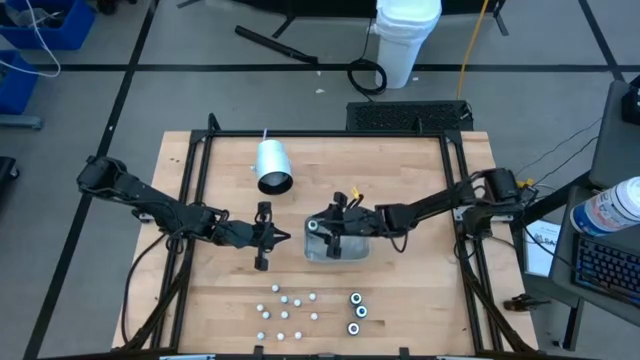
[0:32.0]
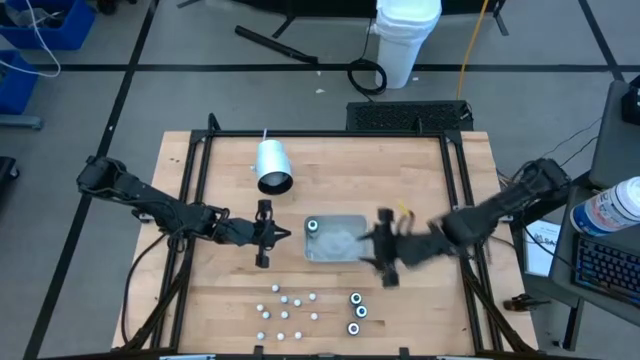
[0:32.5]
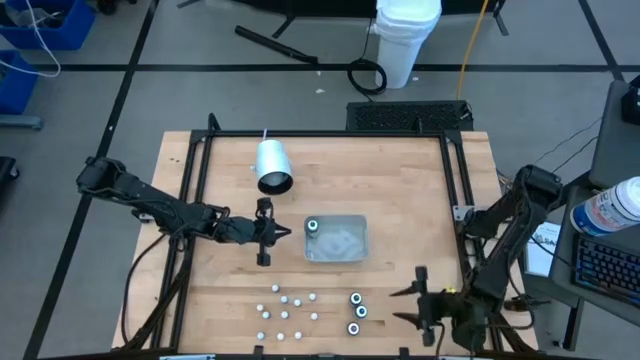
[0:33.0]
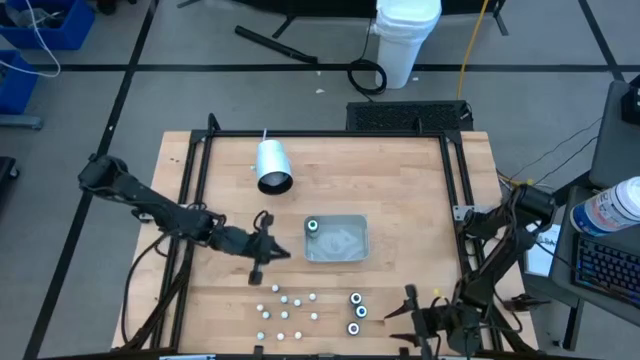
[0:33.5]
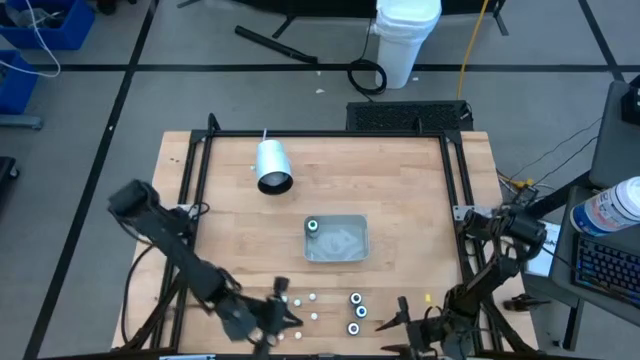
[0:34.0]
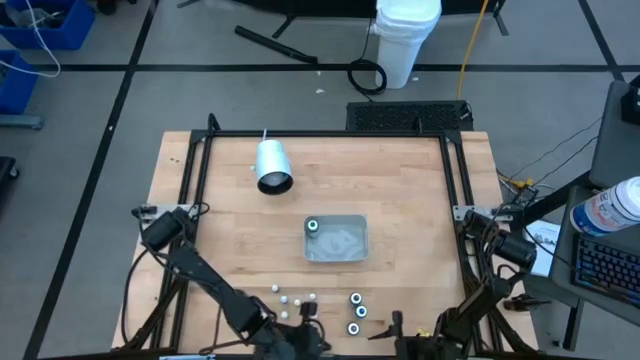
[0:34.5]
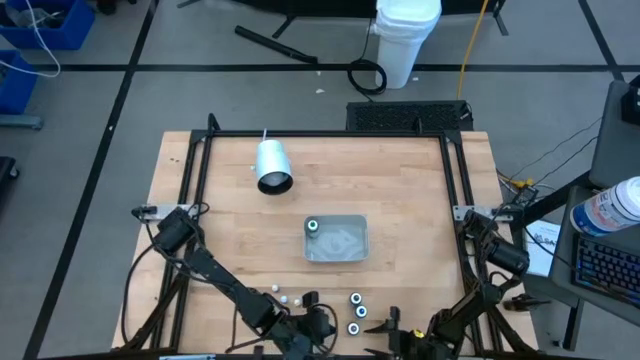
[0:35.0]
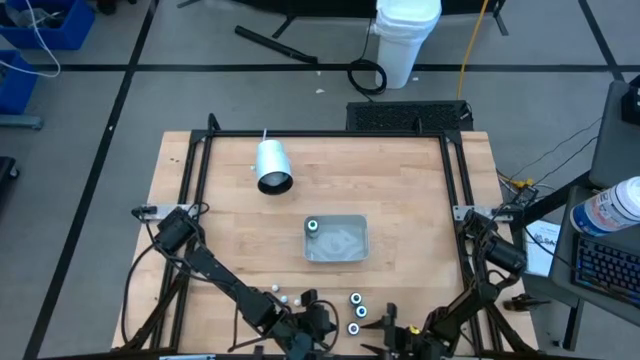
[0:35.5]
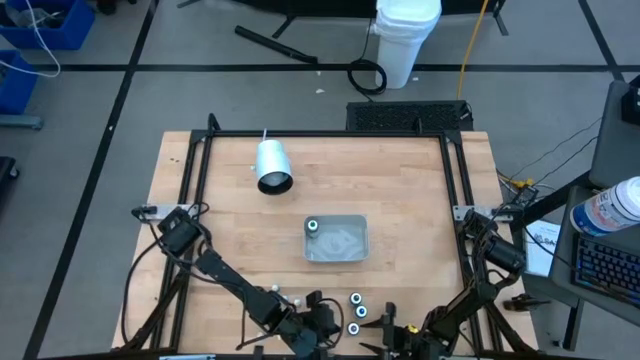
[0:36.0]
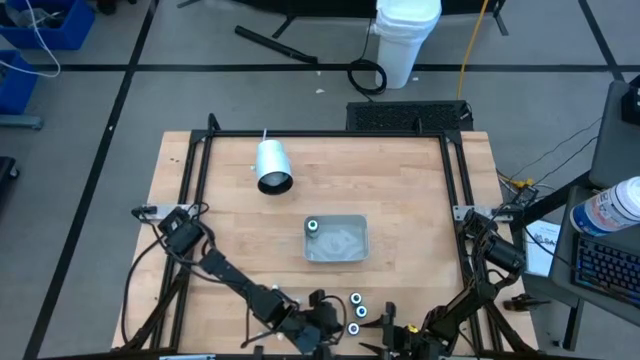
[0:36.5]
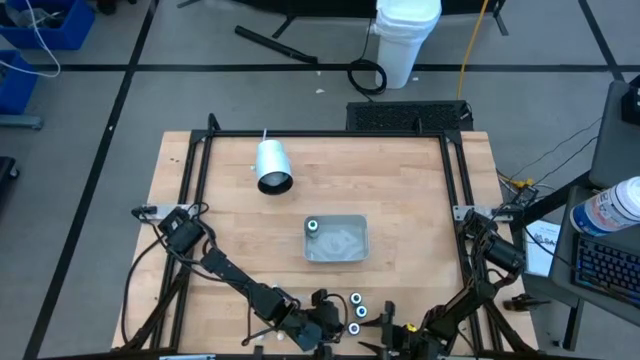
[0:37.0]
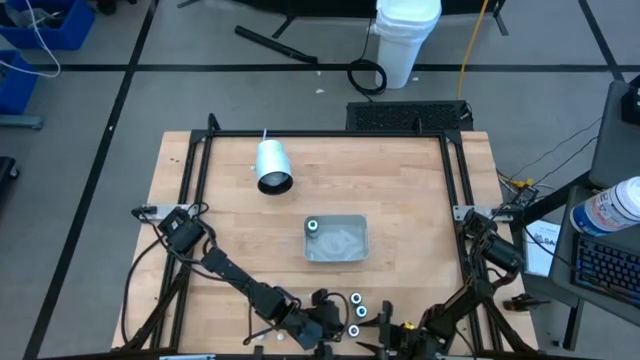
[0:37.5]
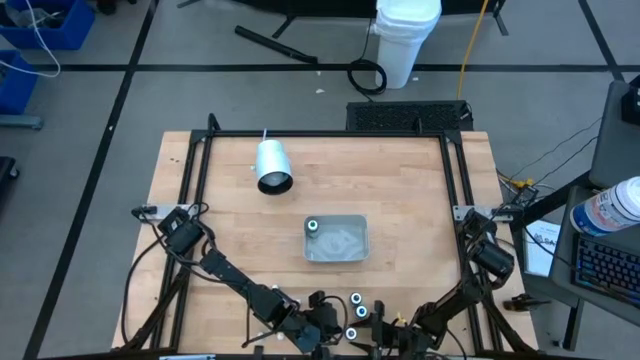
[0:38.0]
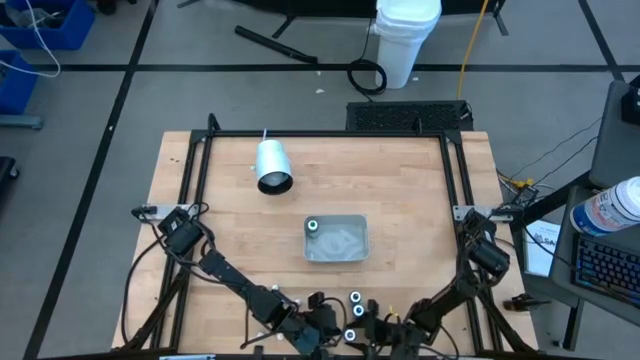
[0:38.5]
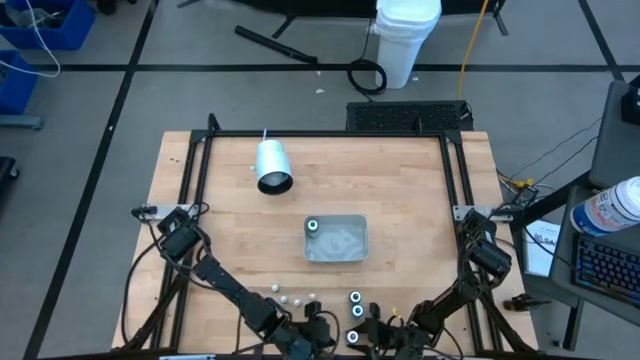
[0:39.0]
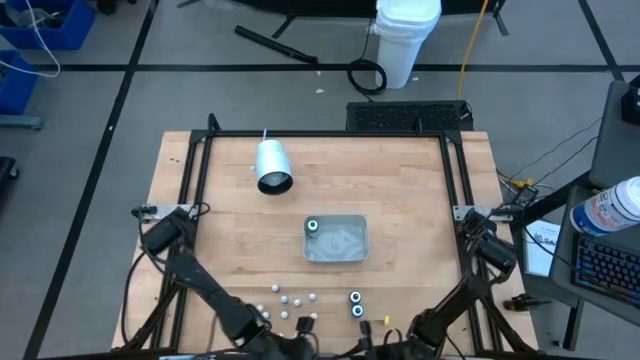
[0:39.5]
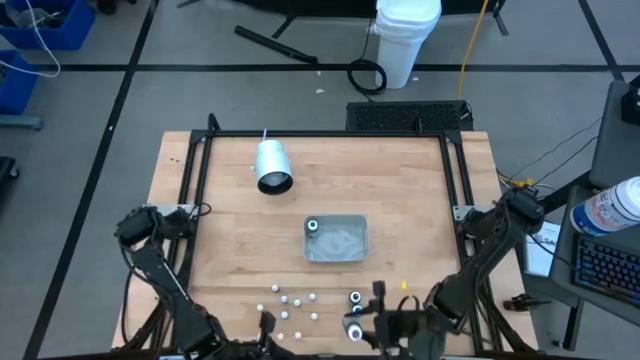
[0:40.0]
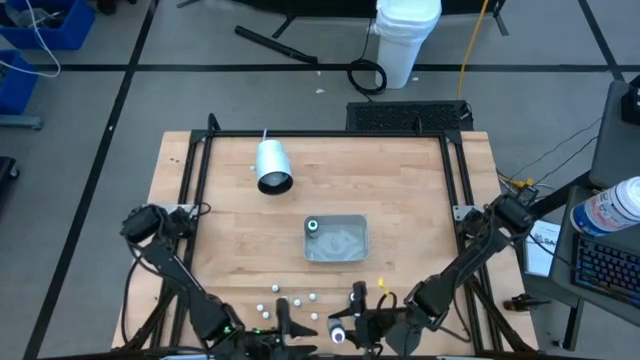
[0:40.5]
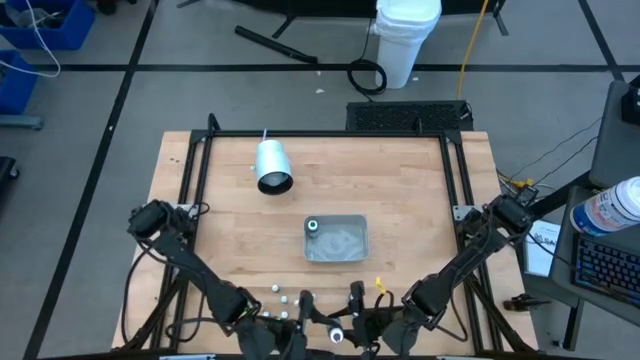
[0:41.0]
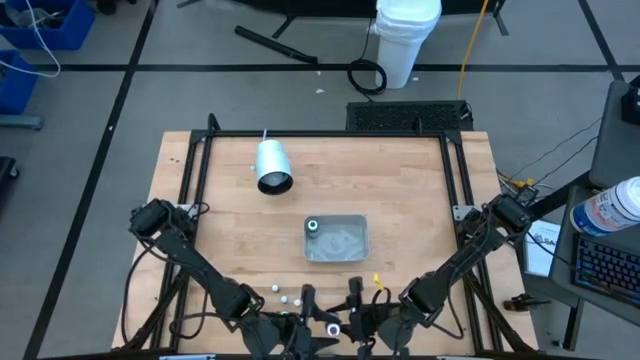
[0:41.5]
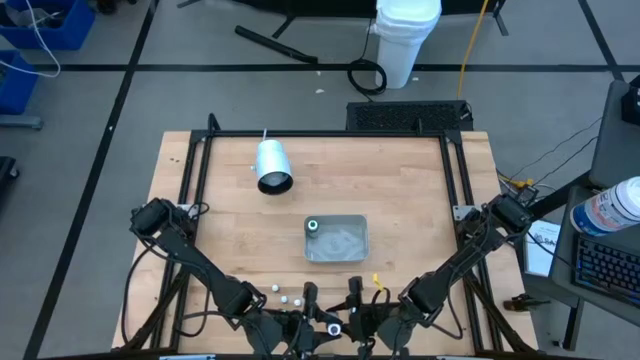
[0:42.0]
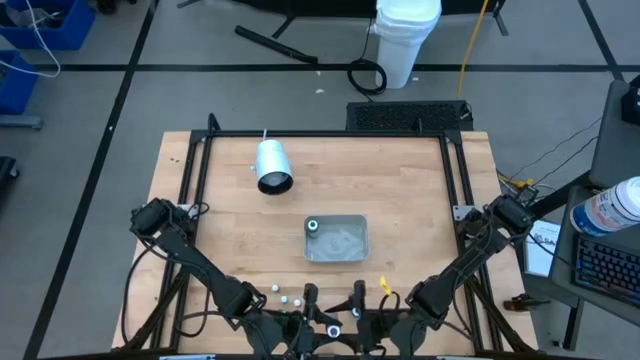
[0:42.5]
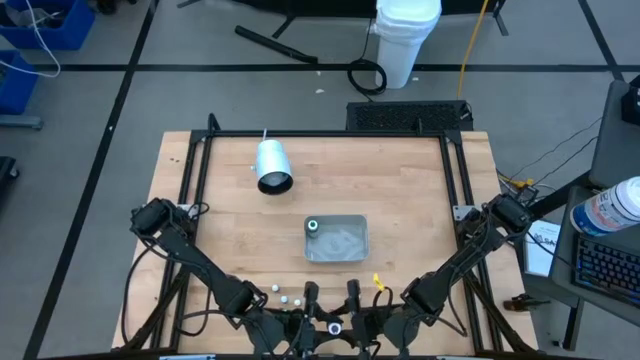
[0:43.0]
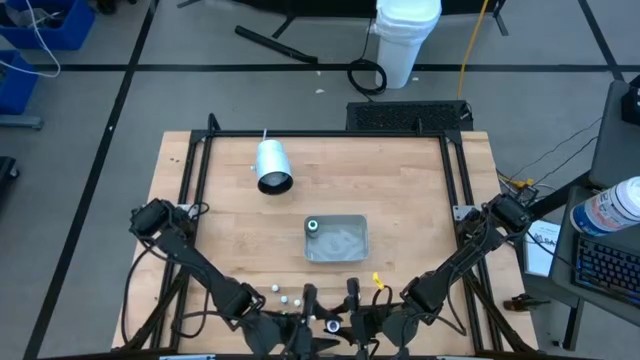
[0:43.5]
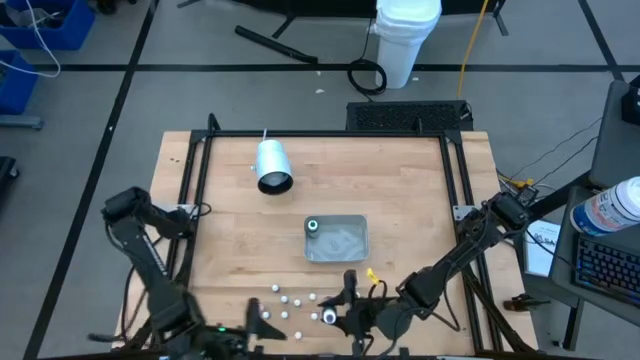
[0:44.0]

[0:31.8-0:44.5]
Task: Pick & Place food coloring
Put the large violet food coloring bottle into the white bin

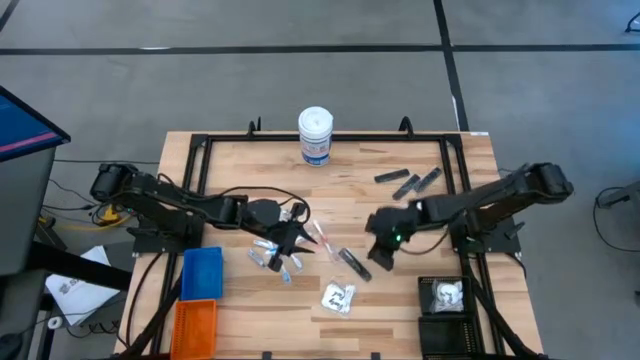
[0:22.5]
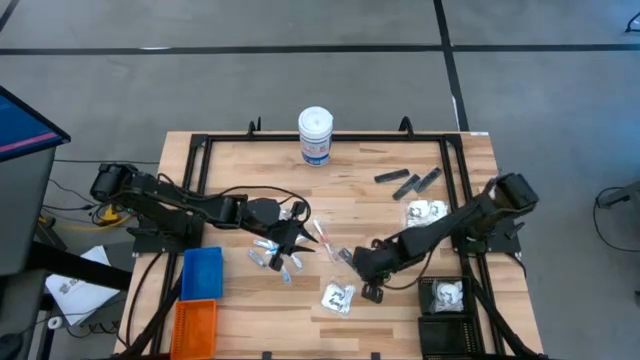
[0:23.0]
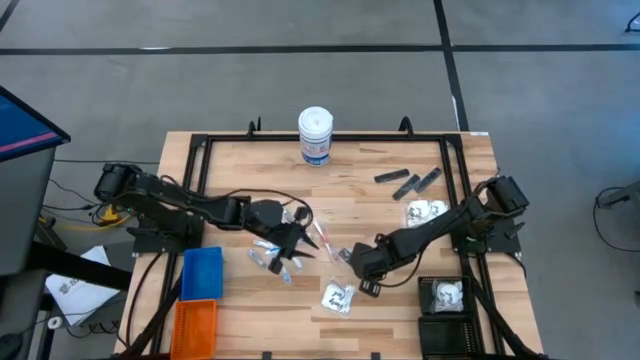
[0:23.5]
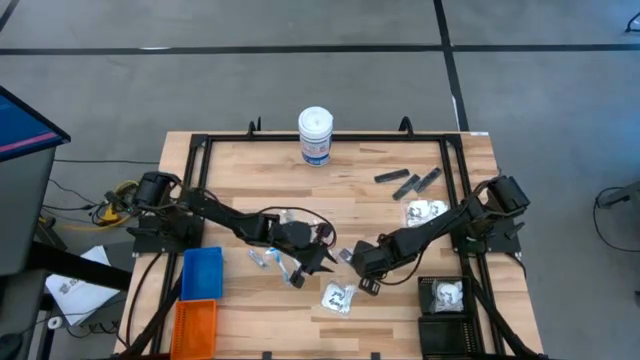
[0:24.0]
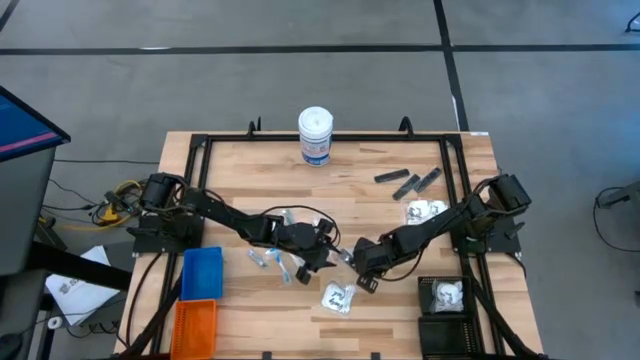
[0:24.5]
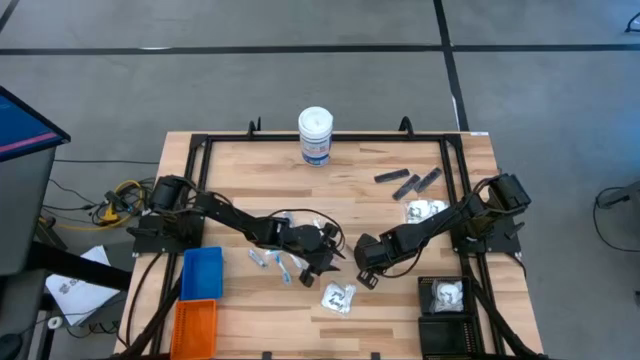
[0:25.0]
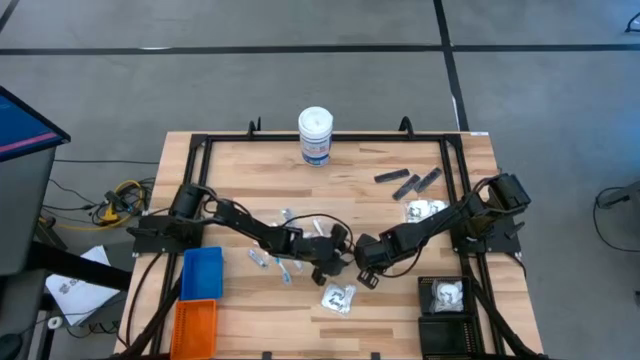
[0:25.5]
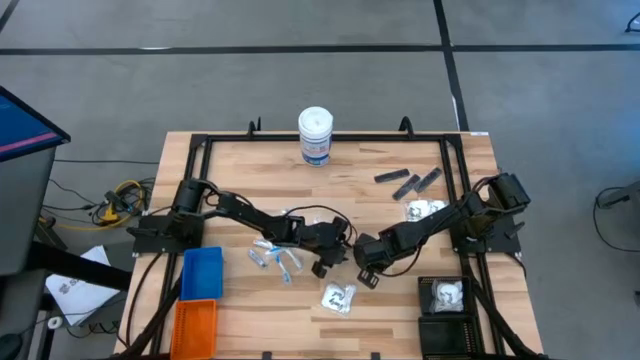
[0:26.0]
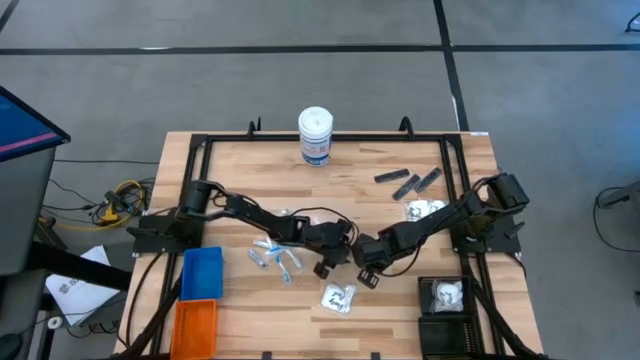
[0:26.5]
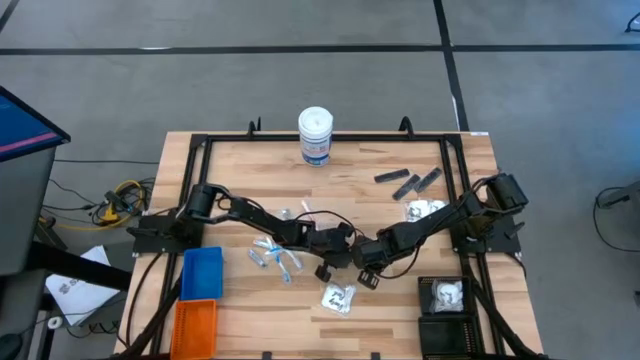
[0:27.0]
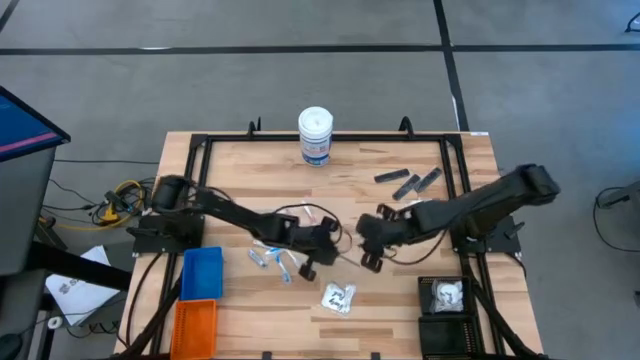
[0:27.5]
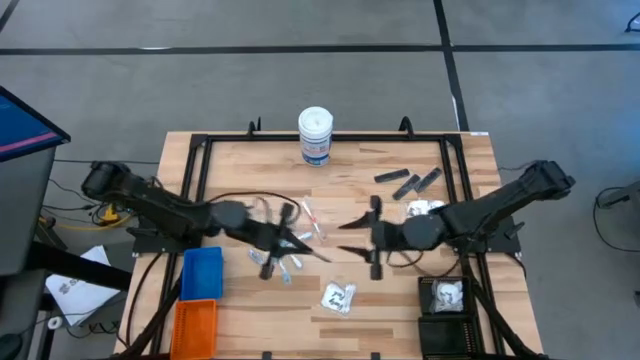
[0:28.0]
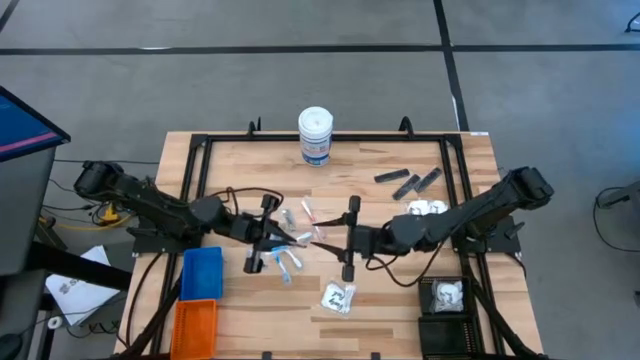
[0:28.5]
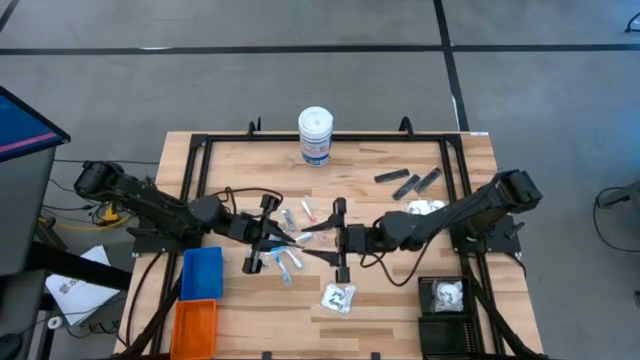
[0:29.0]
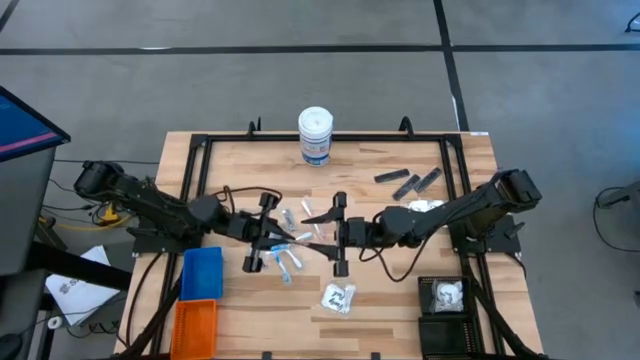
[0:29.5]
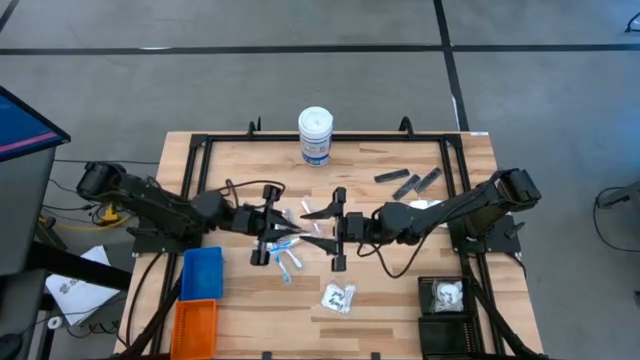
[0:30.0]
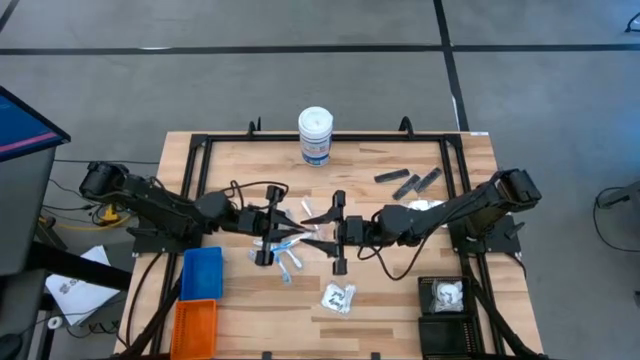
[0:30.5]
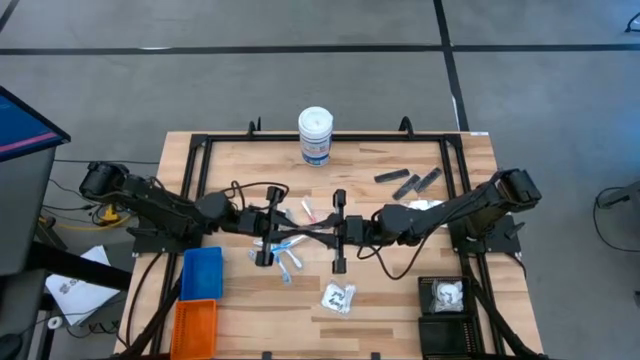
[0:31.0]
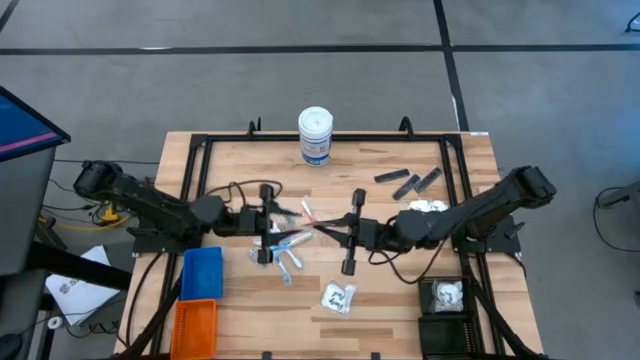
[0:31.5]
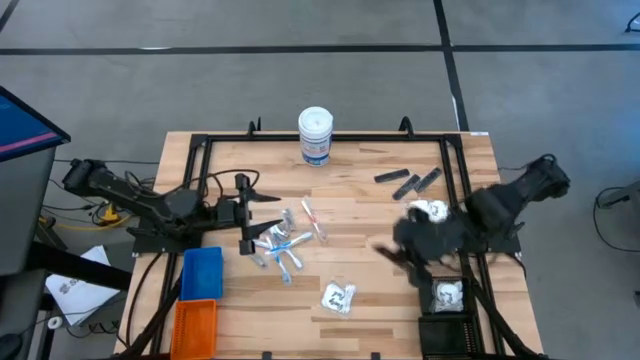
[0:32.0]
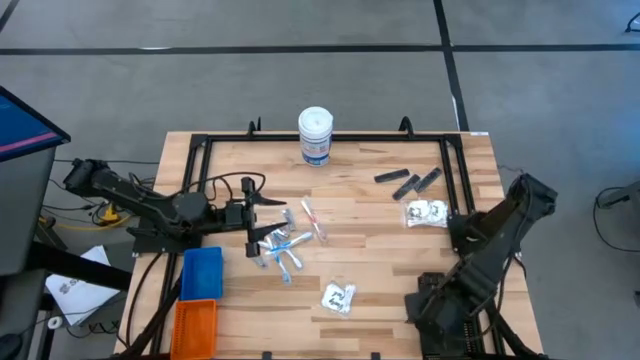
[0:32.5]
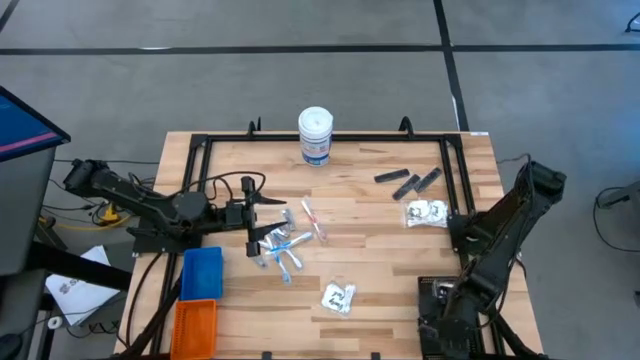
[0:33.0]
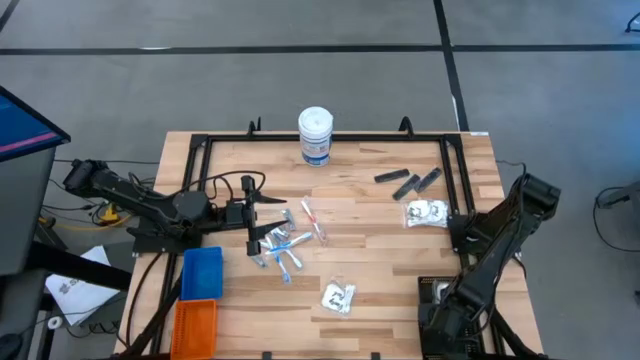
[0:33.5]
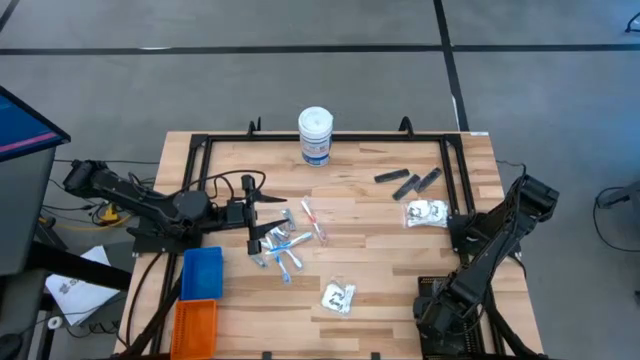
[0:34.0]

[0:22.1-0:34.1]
Task: Pick & Place Travel size toiletries
Put the black comb into the bottom black bin
